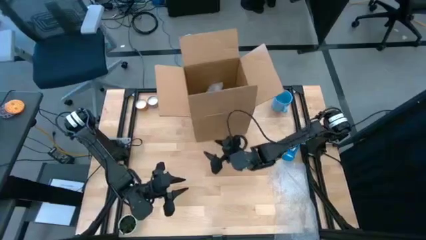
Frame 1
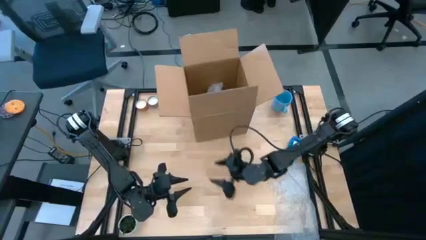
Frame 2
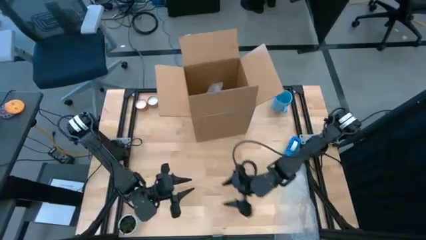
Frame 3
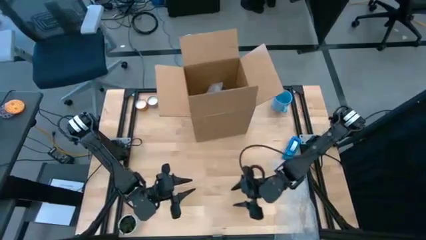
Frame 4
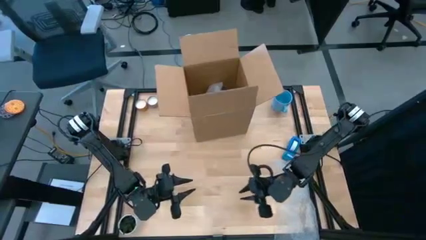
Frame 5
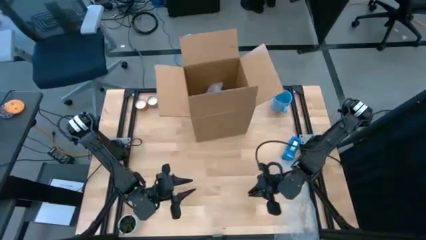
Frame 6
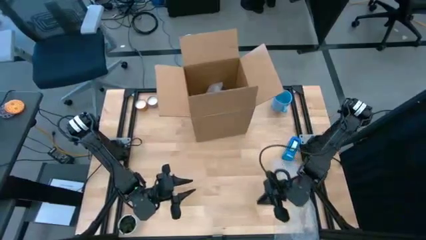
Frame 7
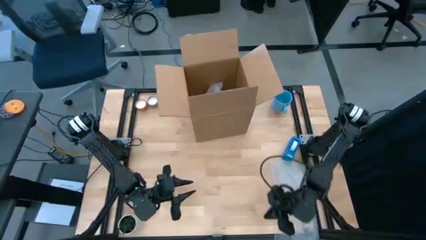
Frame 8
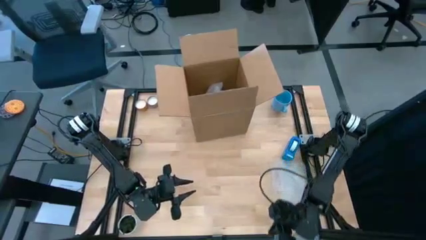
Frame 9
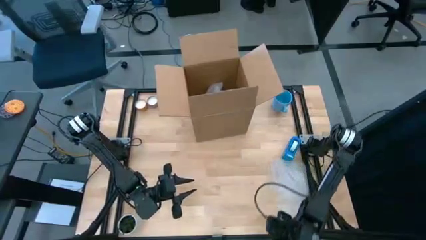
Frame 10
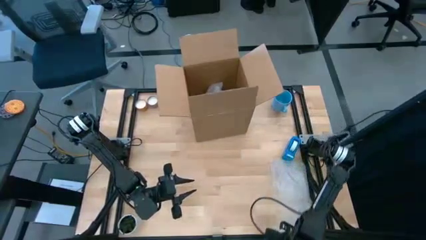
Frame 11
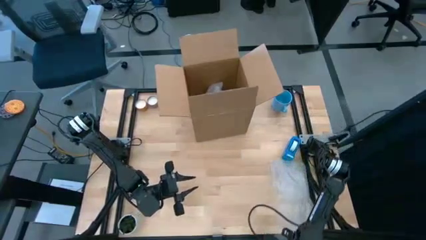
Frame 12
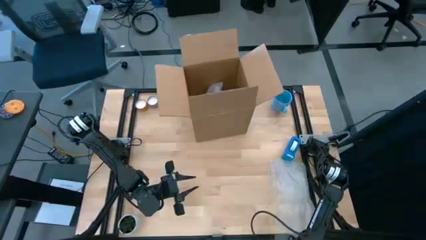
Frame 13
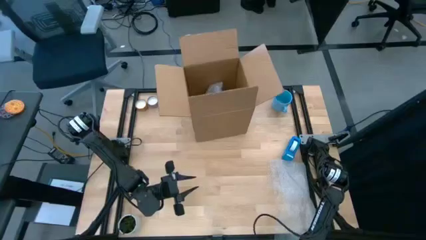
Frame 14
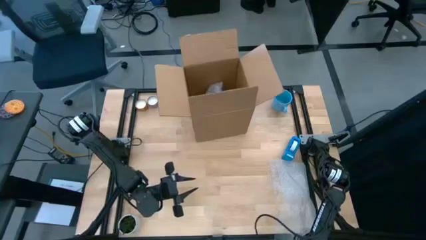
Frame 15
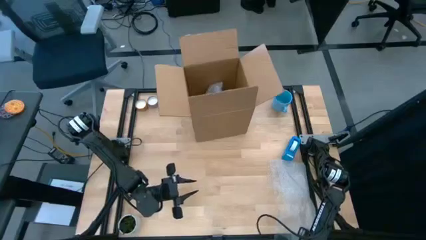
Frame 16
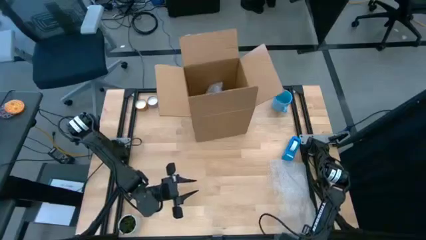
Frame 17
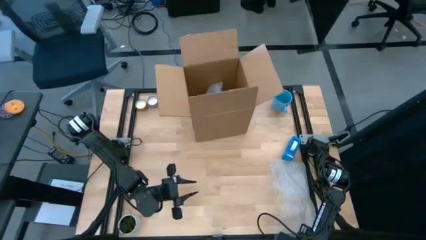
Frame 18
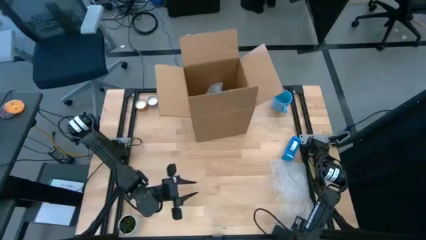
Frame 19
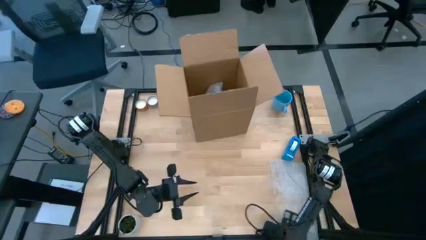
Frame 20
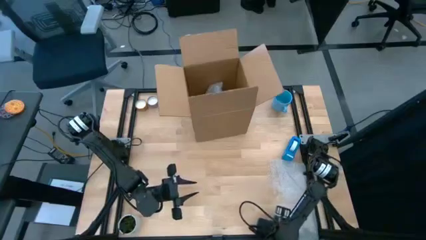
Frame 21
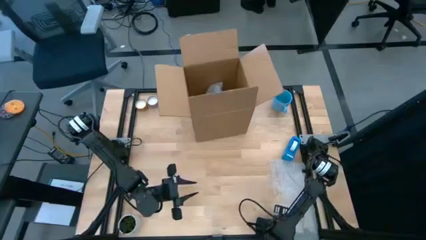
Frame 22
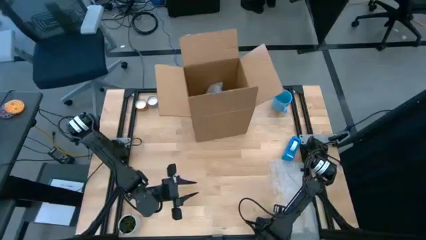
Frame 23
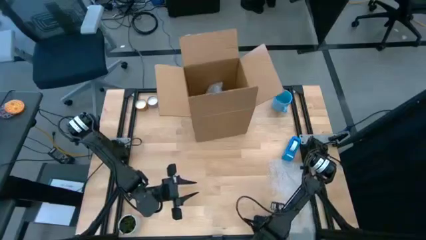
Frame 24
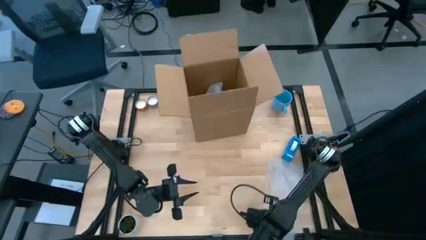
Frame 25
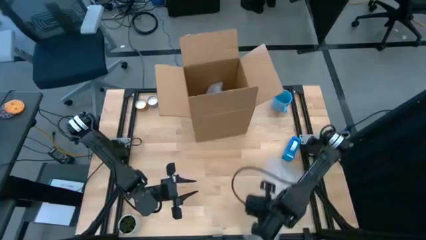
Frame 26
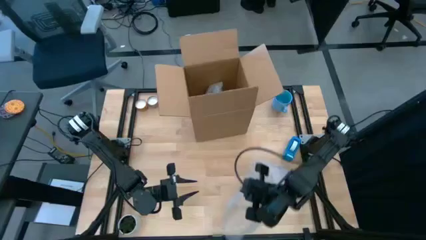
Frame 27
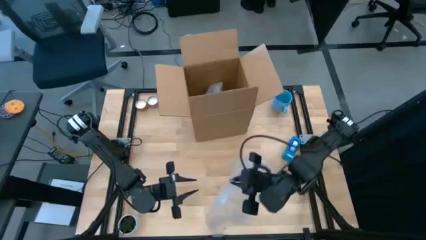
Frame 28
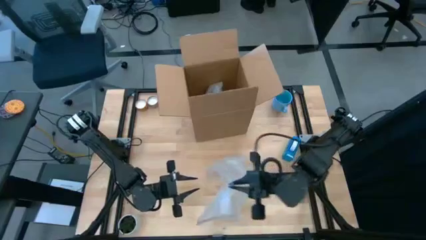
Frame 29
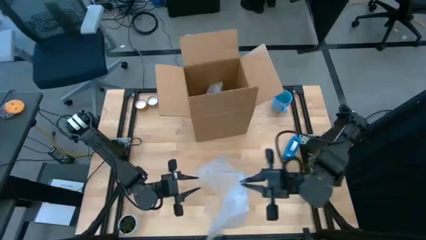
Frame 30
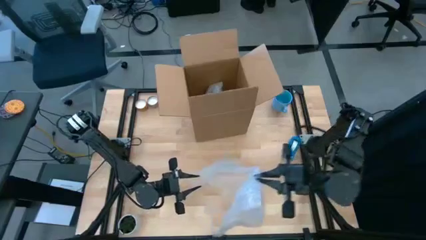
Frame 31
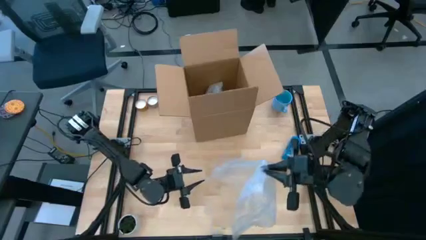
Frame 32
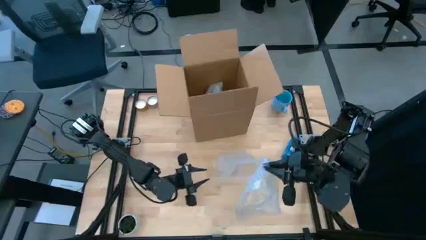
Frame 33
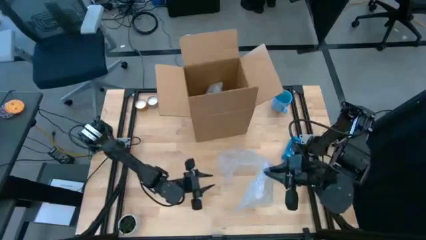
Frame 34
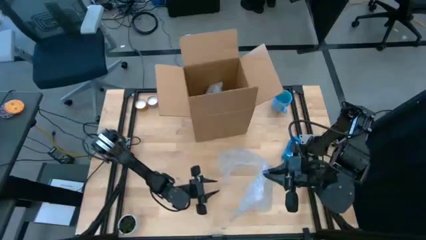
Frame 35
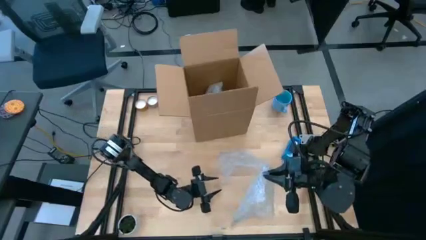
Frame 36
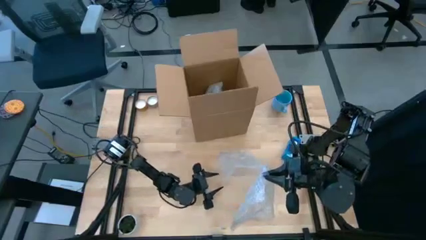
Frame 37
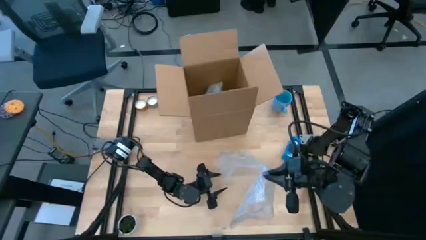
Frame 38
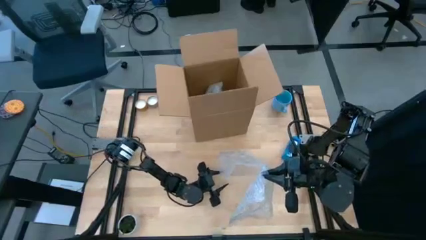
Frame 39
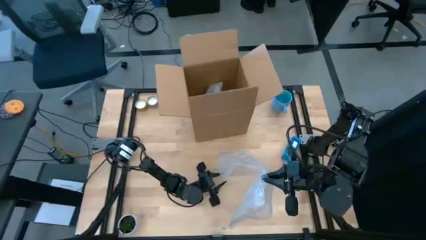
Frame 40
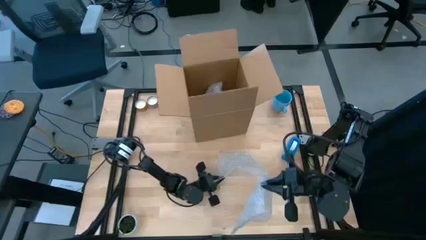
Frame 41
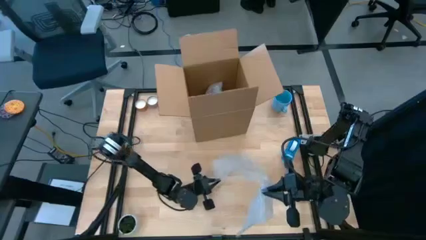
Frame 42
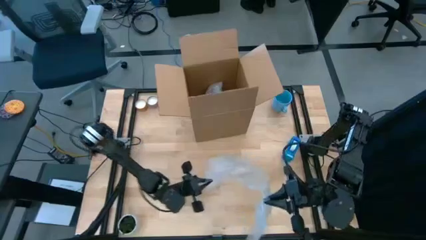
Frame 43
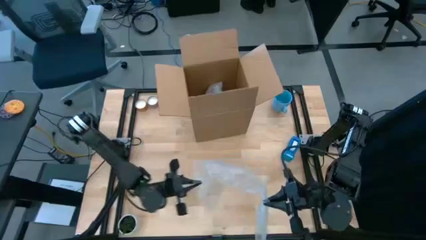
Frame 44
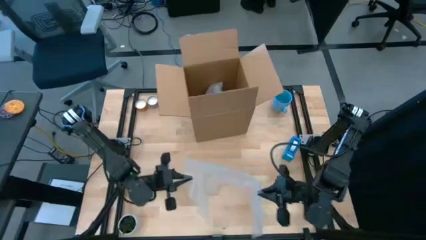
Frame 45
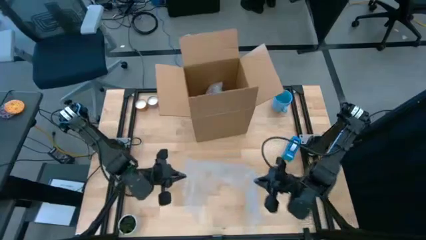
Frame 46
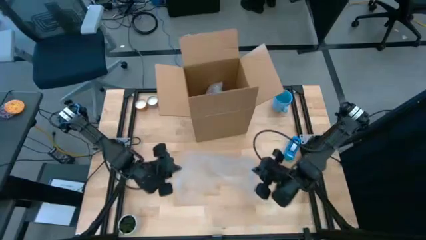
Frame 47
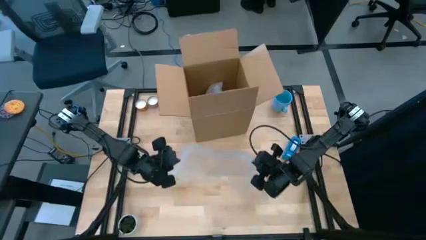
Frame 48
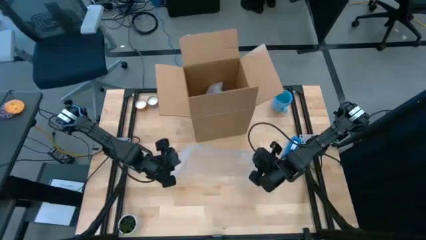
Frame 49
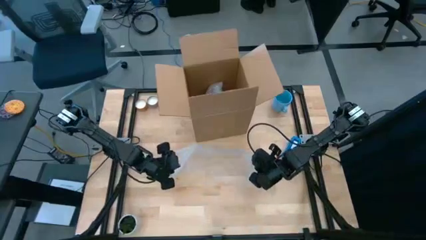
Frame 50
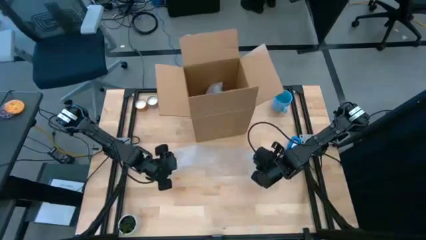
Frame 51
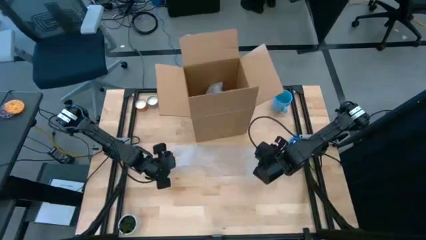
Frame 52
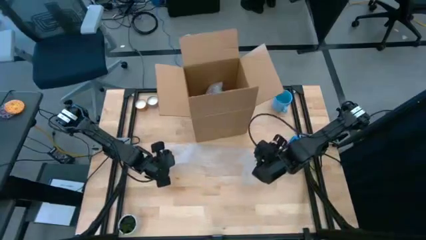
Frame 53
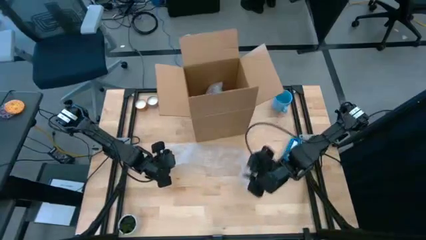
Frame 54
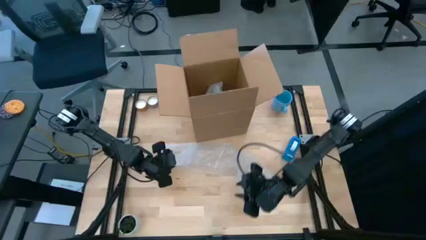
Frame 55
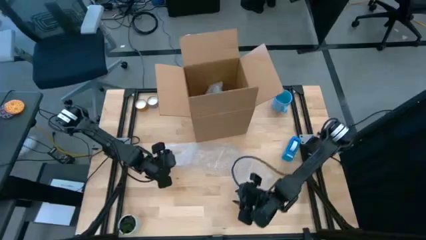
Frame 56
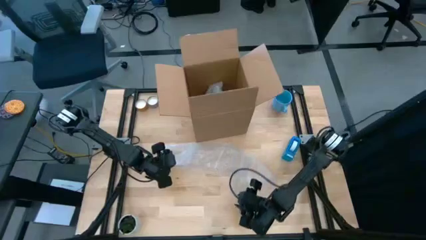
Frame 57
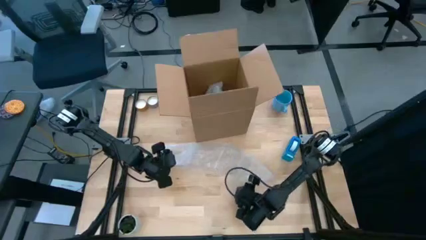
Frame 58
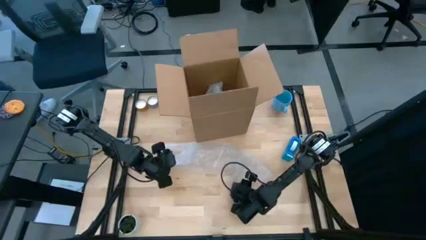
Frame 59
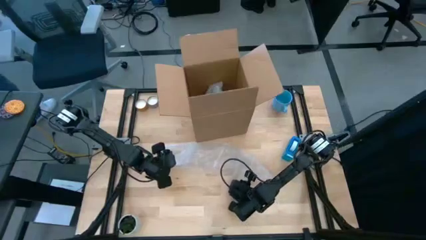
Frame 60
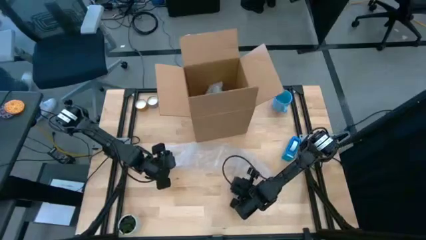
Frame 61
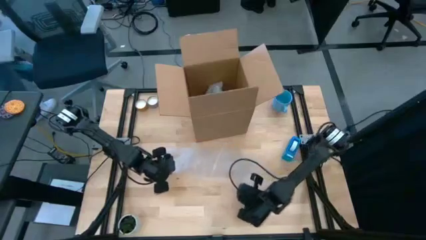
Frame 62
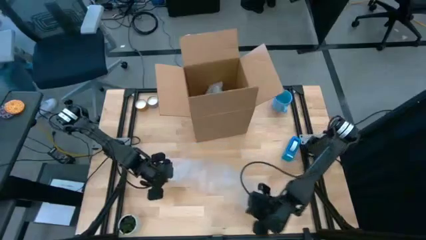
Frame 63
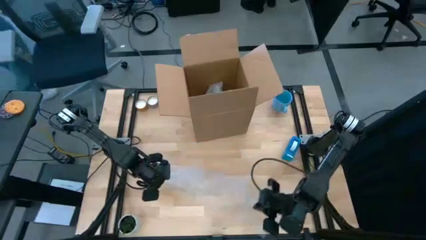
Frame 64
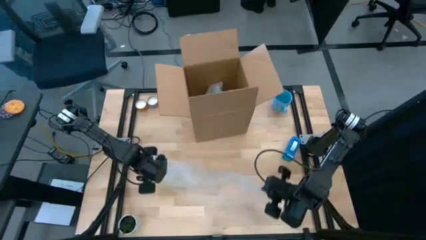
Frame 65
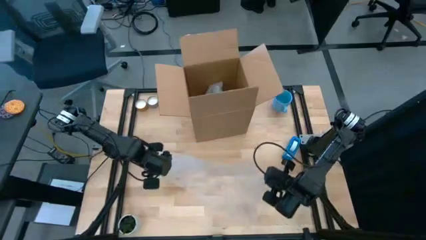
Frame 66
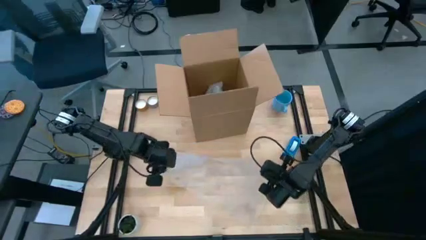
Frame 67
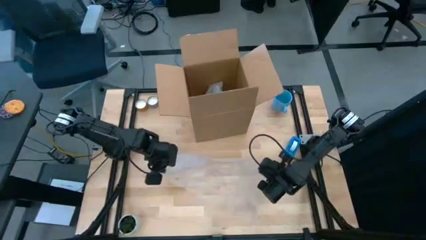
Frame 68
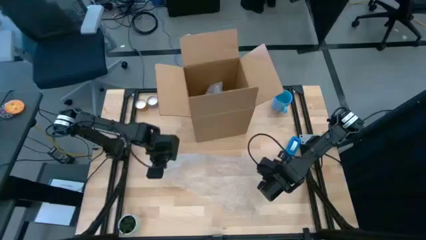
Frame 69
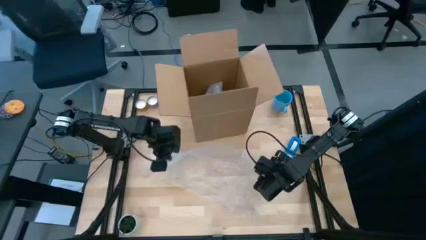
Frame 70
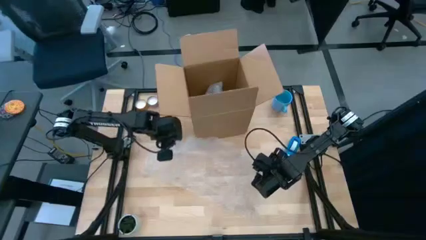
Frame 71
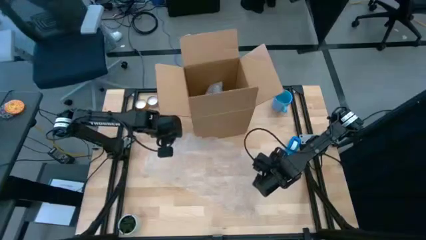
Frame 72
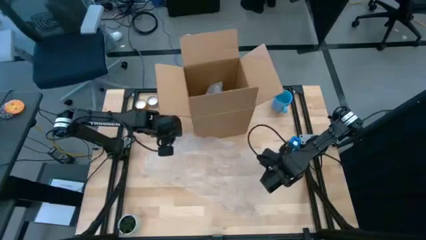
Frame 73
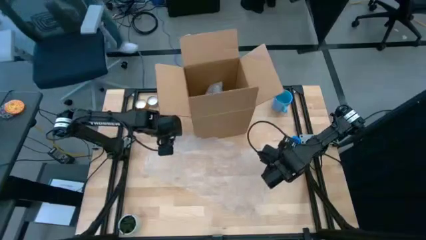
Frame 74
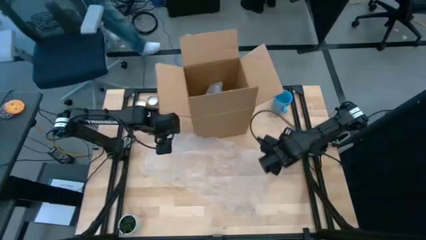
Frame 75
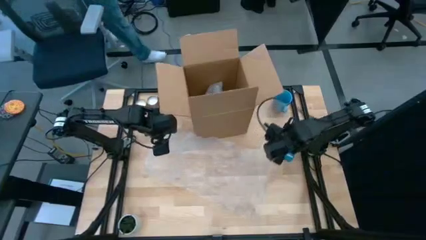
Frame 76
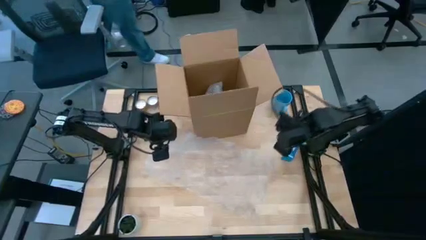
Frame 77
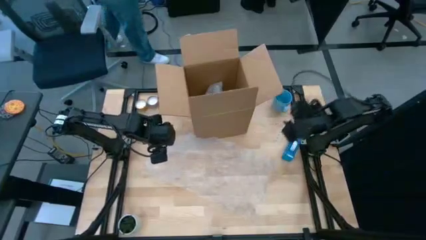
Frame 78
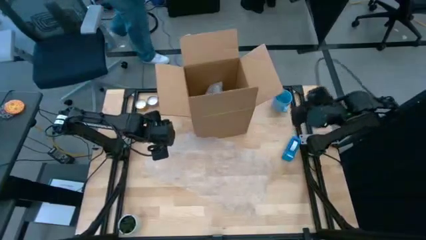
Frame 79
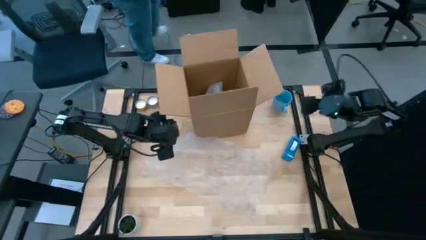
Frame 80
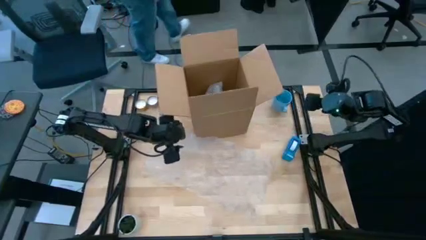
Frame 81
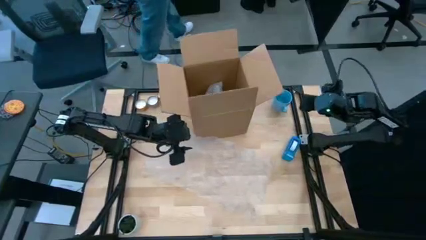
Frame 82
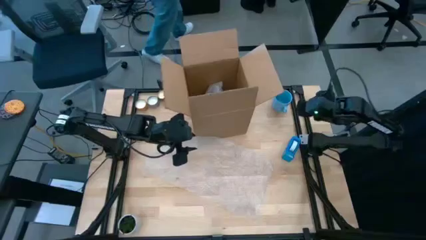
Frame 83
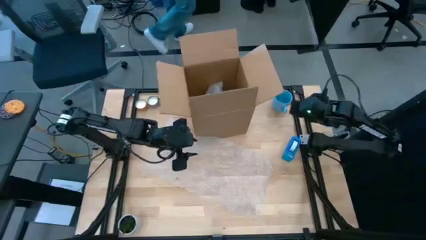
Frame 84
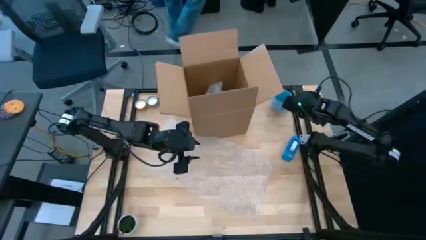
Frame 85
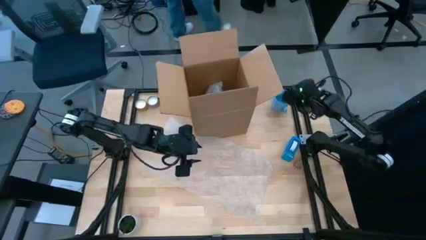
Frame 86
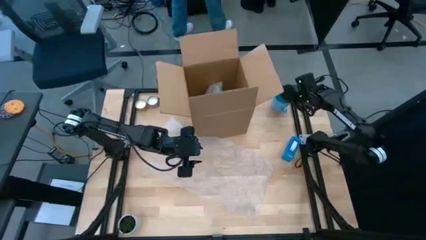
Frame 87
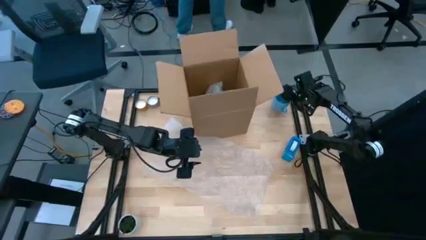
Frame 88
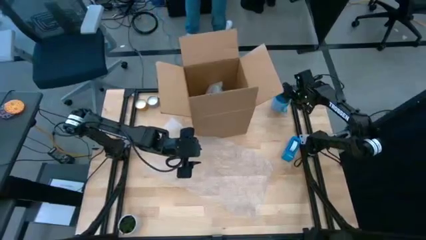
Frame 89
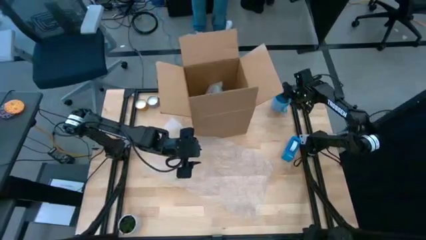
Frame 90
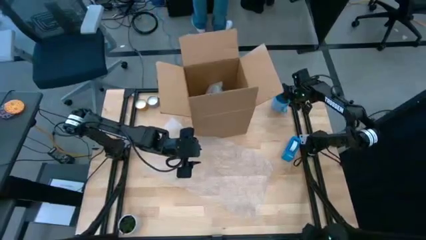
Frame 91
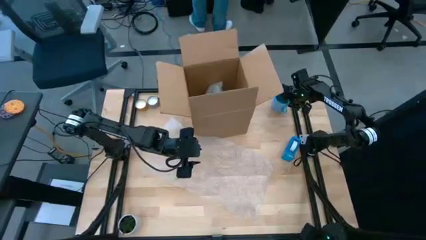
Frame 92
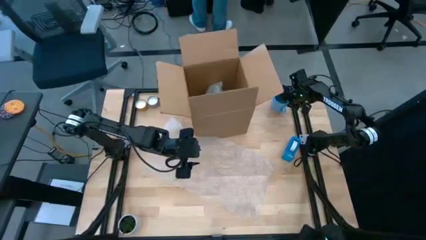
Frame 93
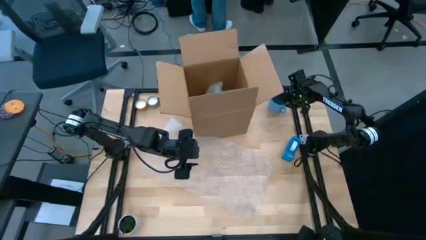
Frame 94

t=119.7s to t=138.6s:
Task: wrap mug
Wrap the blue cup with bubble wrap
